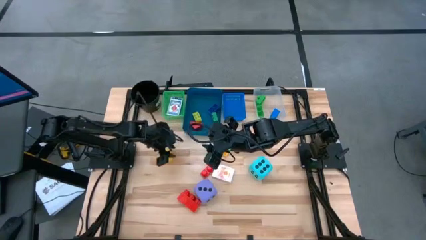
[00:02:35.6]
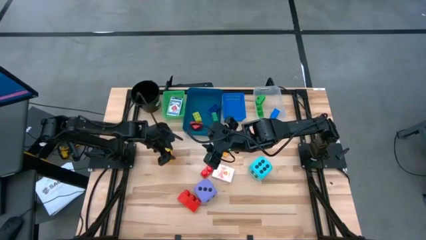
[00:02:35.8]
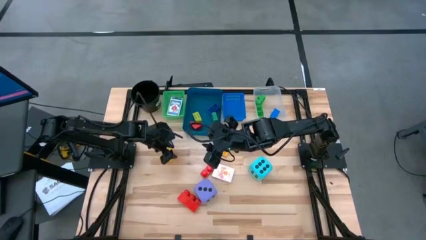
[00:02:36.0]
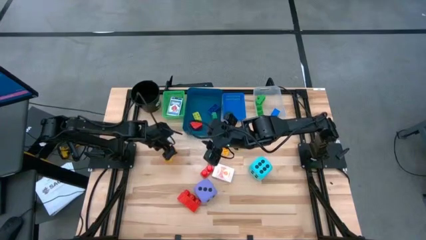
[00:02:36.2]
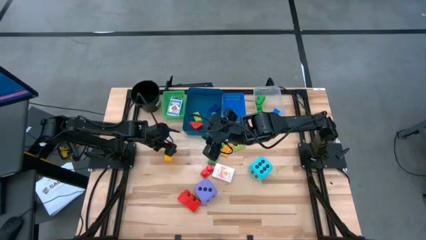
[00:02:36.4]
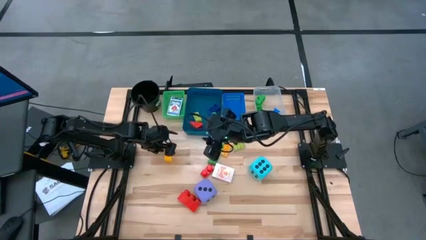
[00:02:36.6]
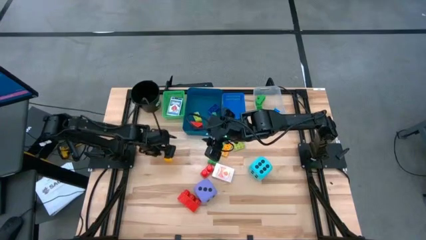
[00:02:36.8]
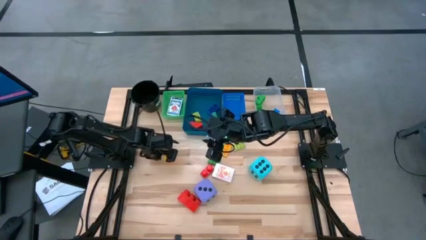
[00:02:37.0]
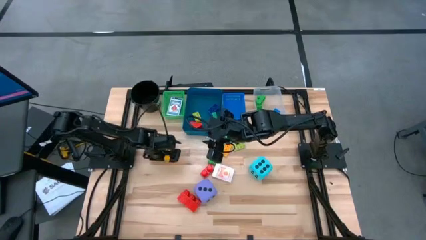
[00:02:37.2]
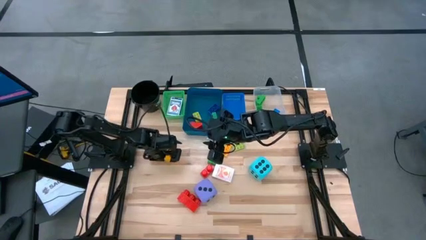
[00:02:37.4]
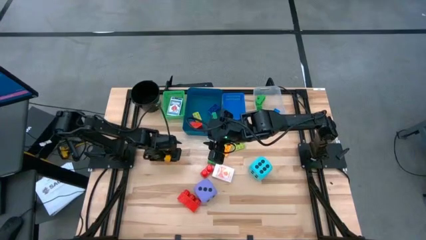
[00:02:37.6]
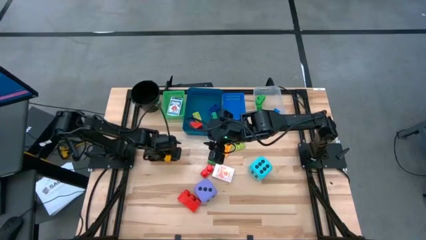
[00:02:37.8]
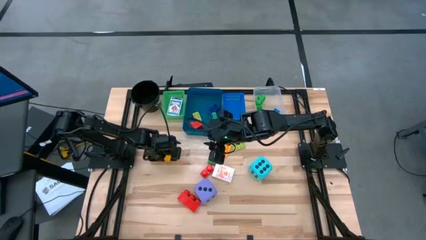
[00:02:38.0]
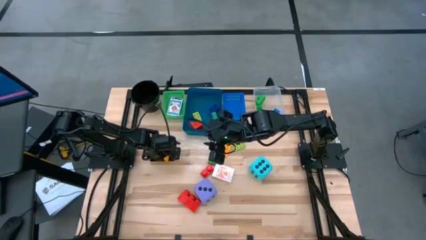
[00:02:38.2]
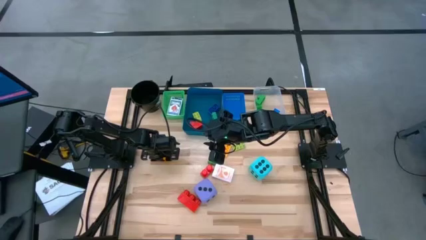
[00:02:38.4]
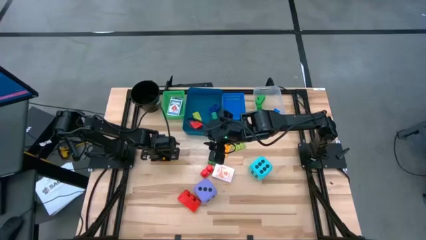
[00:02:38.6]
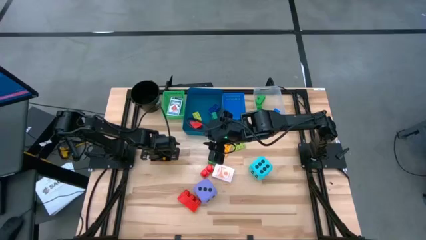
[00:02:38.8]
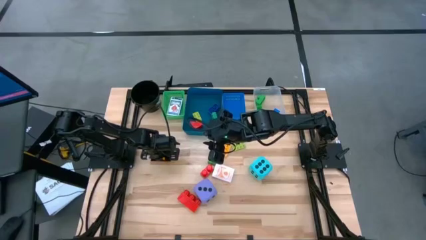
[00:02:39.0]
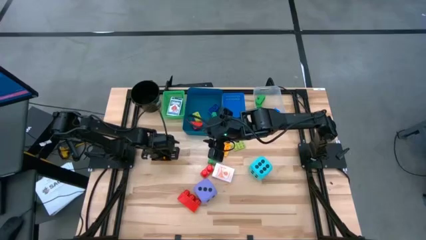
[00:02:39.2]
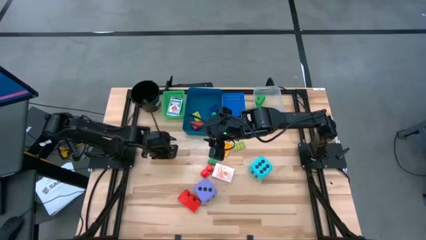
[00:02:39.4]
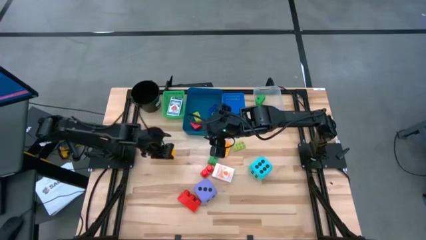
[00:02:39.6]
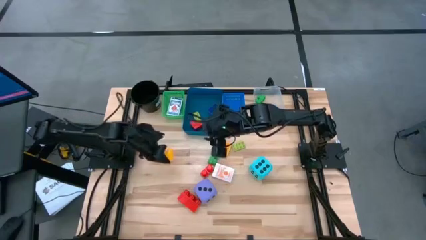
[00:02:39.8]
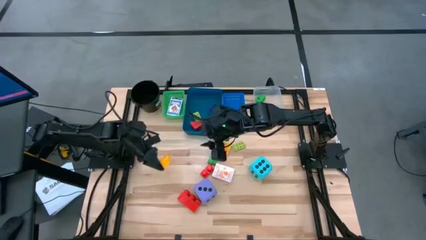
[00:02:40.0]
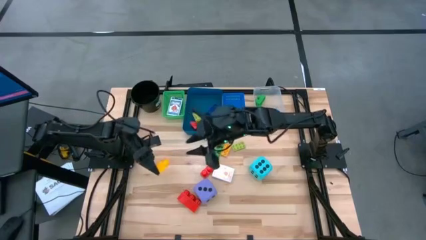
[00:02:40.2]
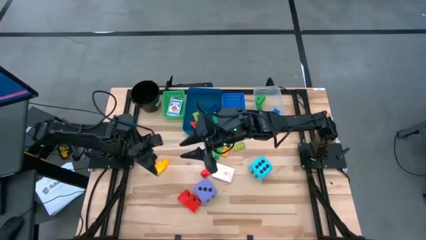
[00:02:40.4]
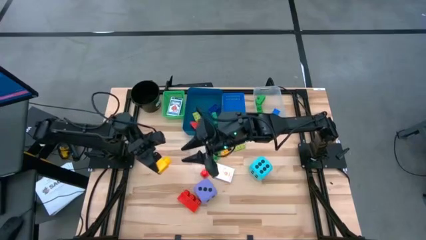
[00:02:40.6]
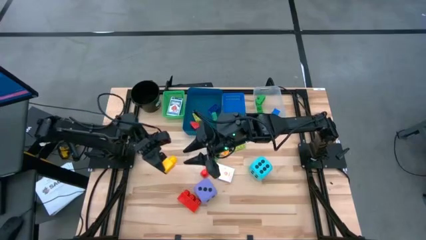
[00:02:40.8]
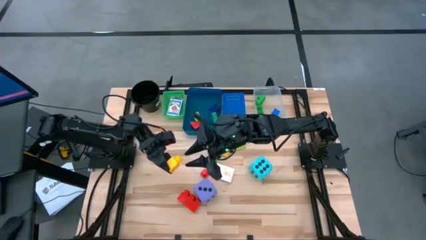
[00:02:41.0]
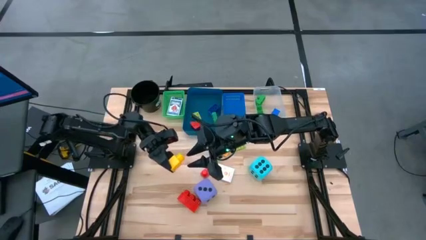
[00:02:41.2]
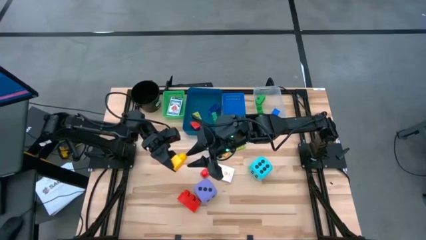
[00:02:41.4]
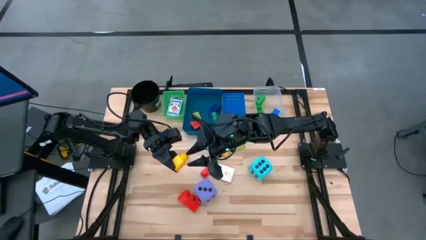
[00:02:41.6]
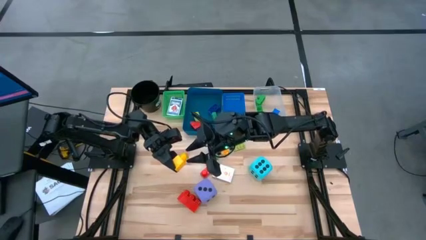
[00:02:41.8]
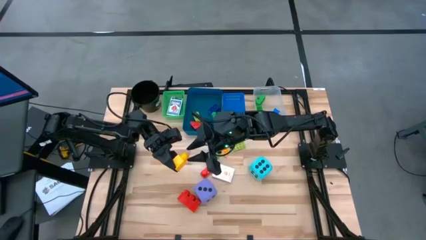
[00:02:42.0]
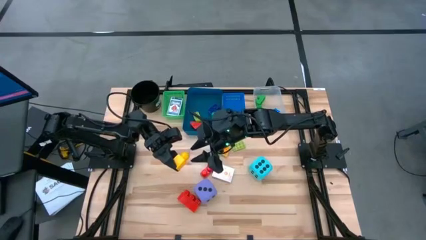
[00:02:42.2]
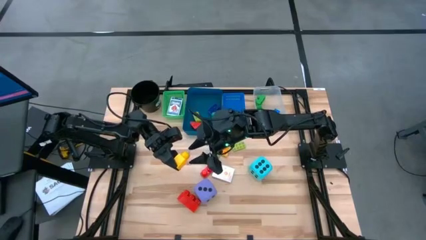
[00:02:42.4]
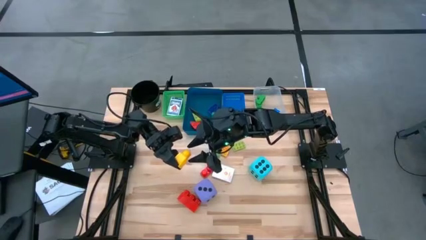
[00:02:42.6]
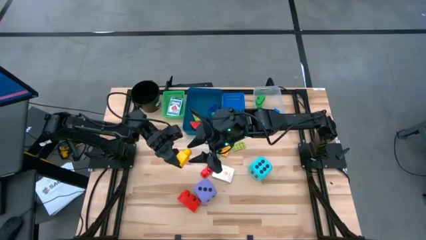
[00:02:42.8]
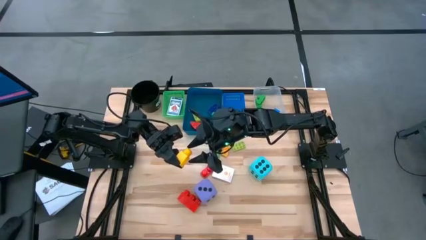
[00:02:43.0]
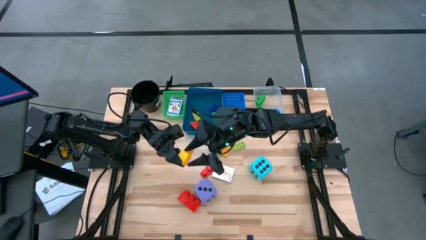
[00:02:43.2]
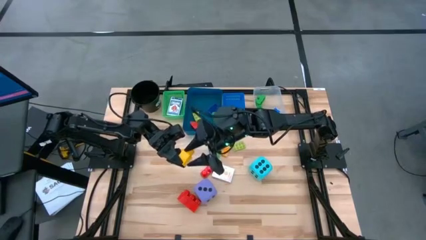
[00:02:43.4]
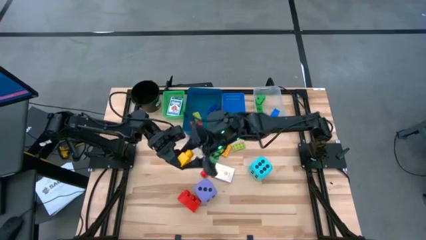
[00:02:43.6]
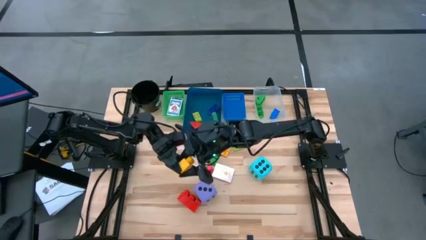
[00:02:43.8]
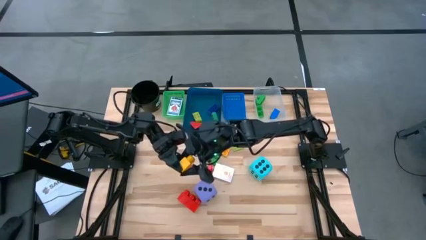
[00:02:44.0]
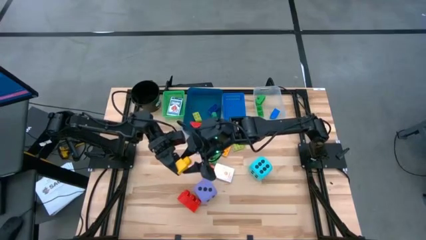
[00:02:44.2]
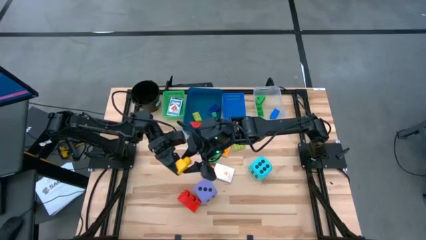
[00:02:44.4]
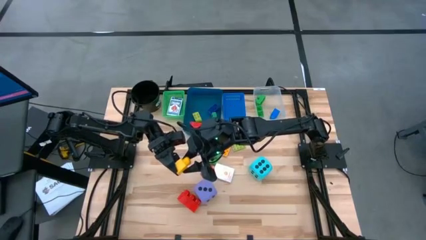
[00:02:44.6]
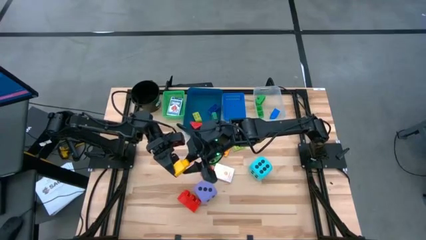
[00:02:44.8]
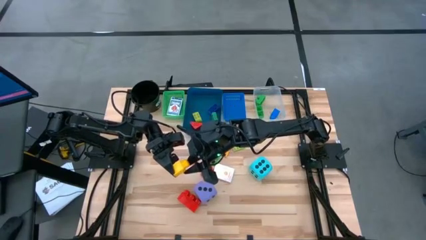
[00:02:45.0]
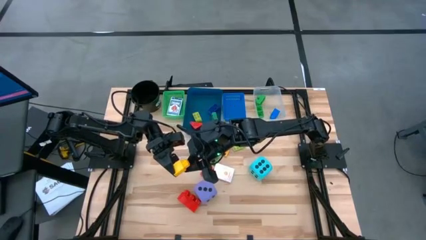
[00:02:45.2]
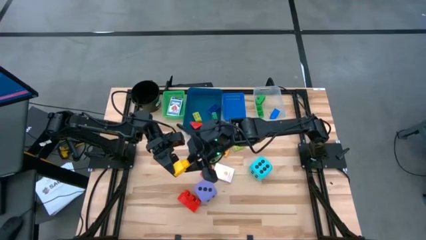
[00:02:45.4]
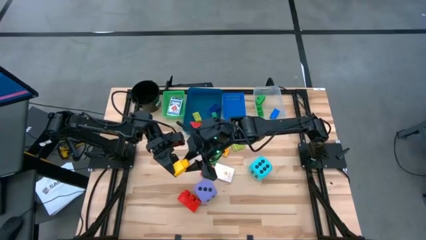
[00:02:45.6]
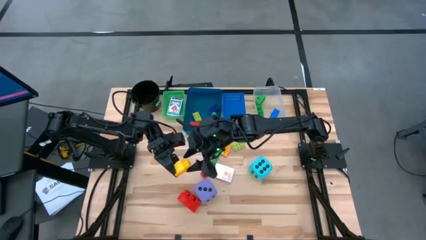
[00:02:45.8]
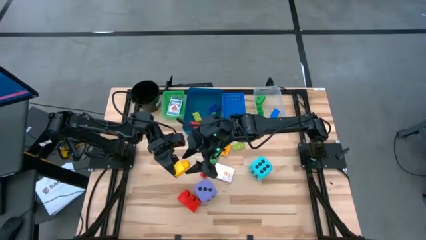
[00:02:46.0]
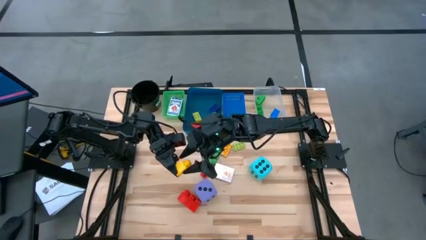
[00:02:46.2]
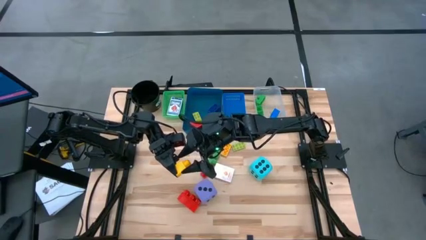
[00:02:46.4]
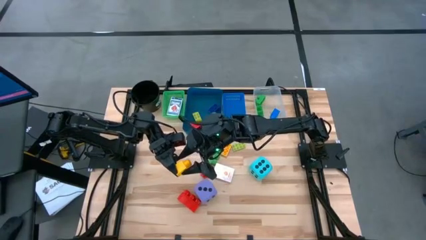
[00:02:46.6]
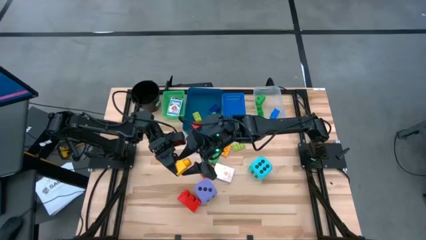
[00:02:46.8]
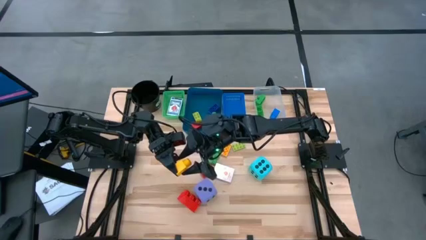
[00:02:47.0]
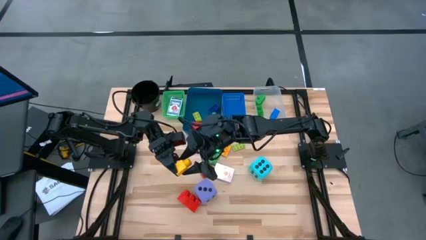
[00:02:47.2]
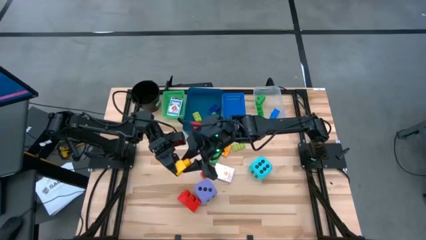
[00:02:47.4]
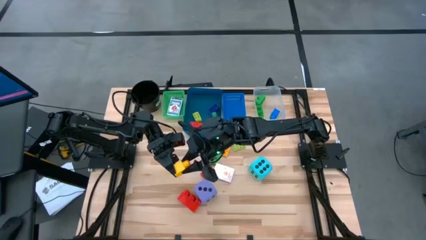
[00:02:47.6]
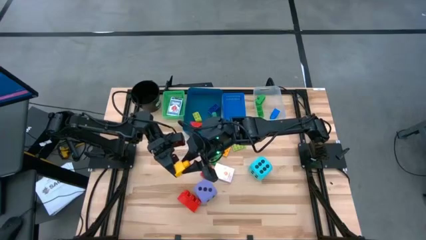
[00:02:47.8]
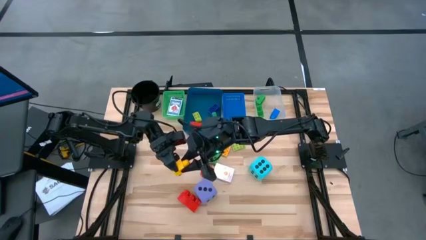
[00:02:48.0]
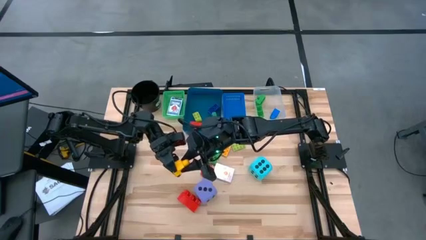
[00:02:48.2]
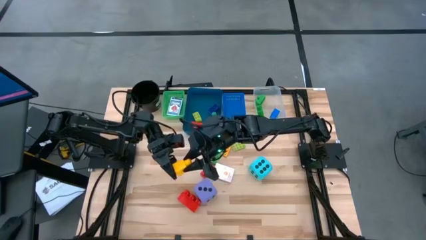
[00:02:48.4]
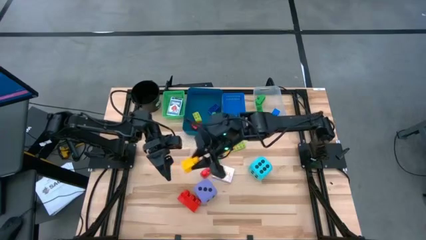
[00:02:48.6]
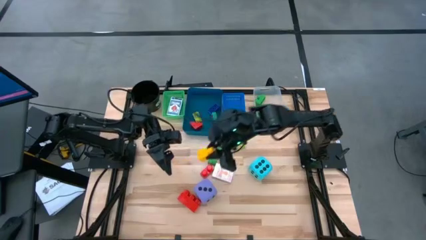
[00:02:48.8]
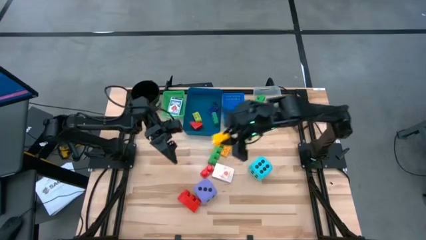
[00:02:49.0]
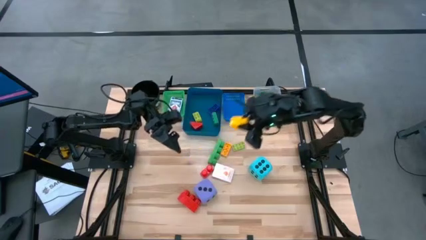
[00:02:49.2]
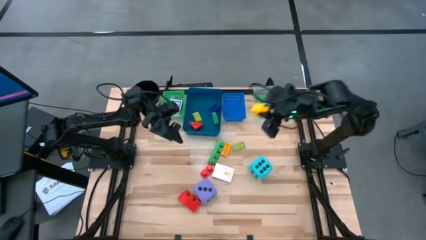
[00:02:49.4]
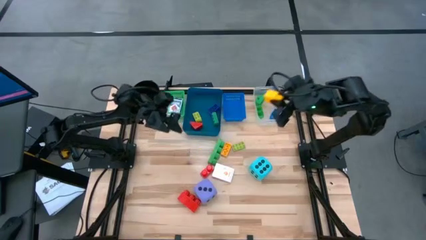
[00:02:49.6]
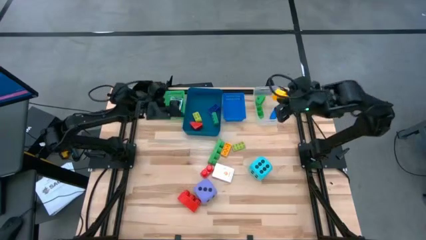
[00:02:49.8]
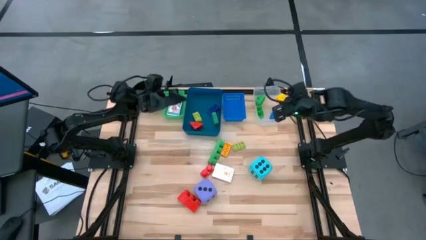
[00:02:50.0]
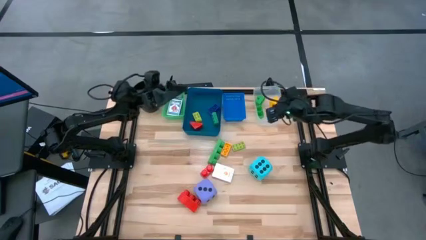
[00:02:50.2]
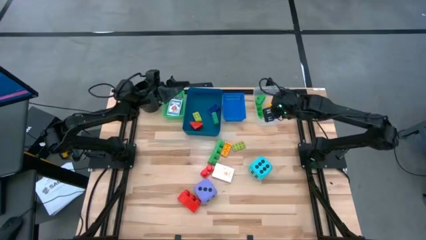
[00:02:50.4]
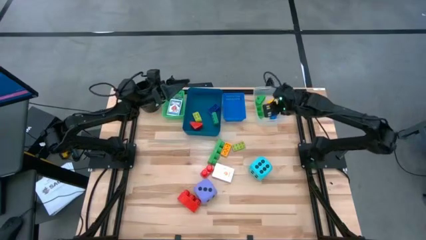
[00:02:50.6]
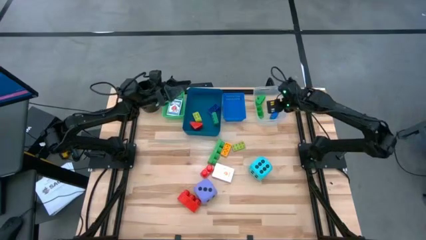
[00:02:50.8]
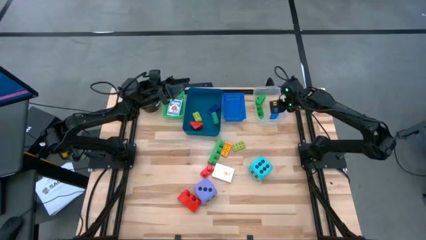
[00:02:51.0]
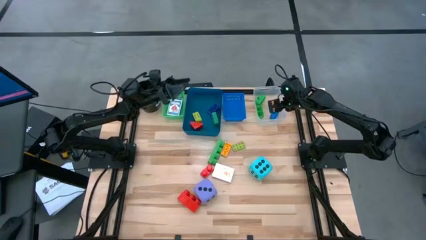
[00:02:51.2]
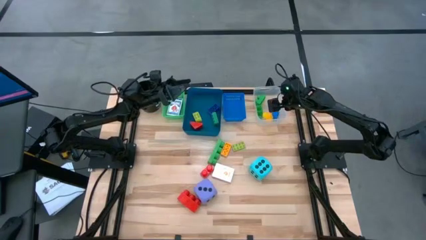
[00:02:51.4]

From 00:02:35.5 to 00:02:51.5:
Task: Pick & Place Toys
Put the large yellow game piece into the transparent bin
